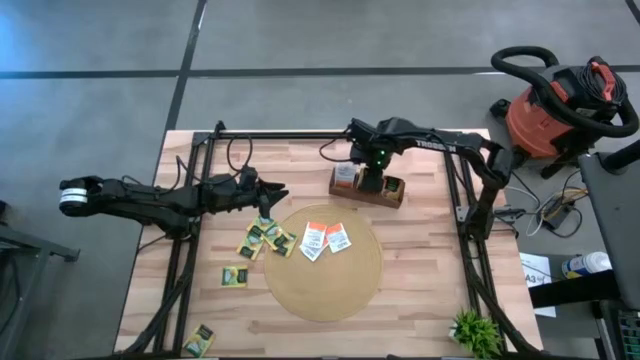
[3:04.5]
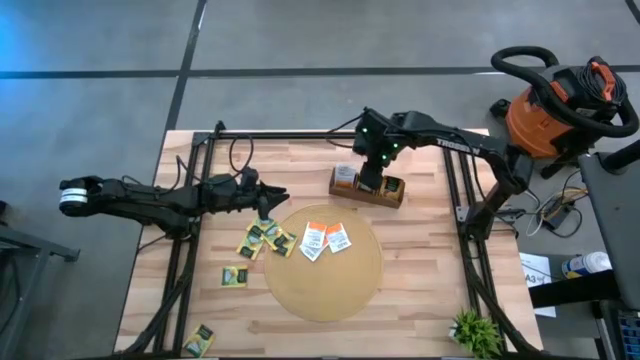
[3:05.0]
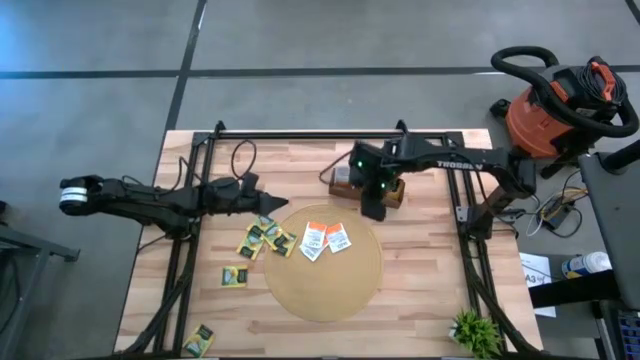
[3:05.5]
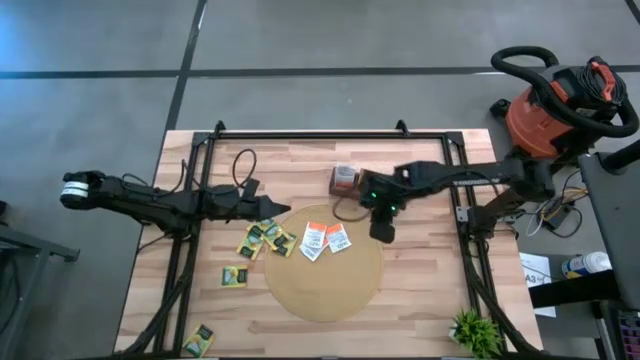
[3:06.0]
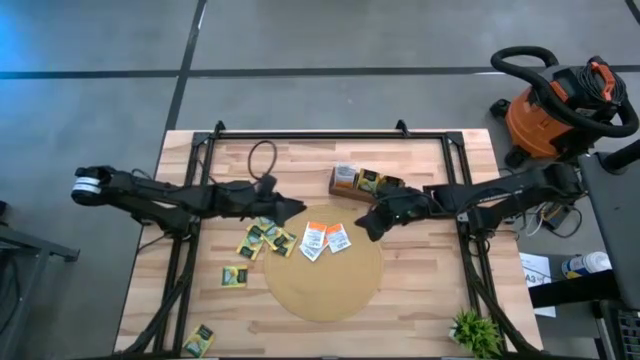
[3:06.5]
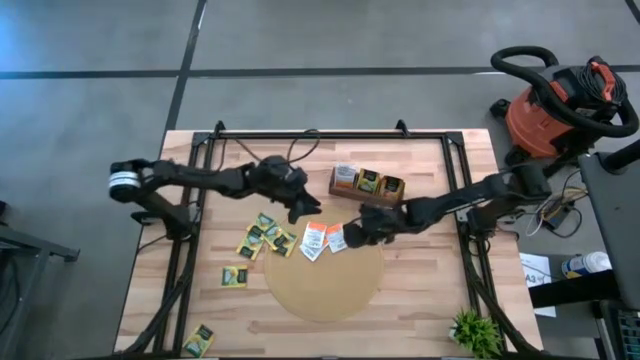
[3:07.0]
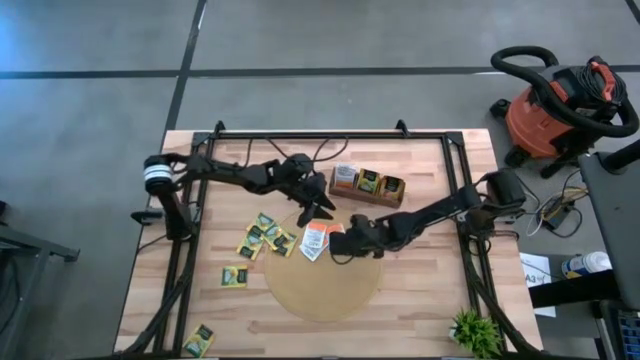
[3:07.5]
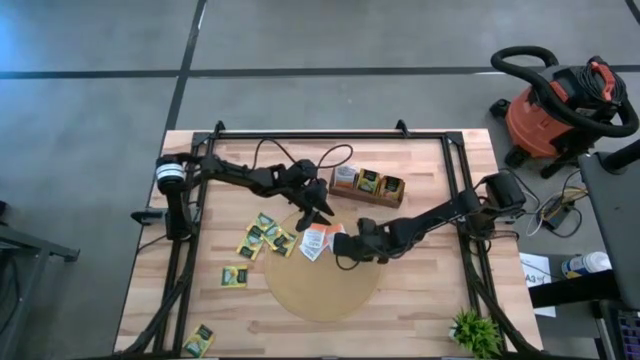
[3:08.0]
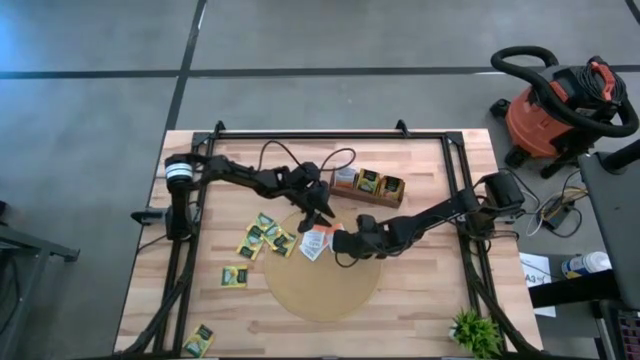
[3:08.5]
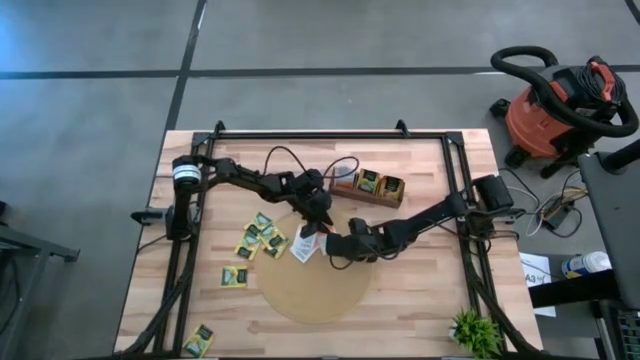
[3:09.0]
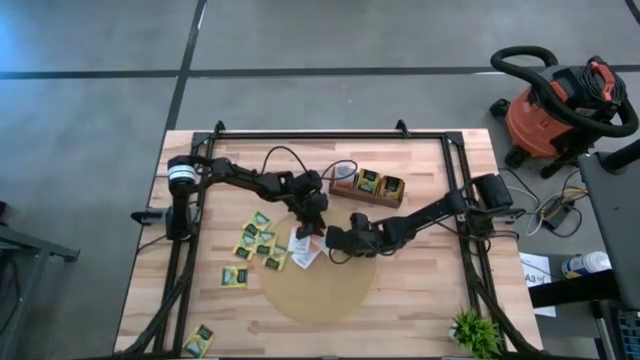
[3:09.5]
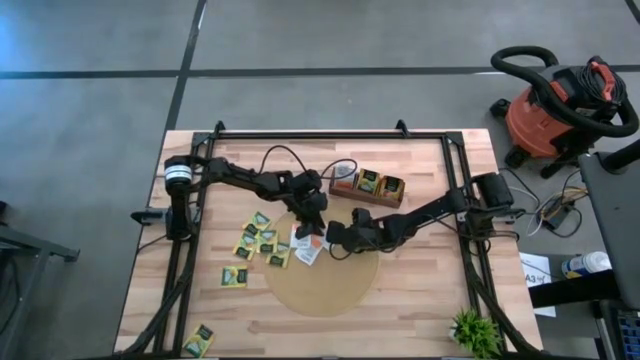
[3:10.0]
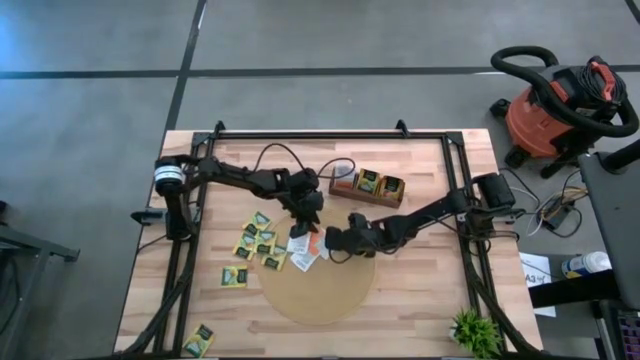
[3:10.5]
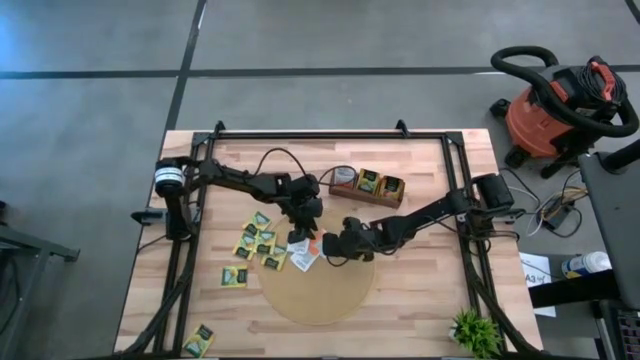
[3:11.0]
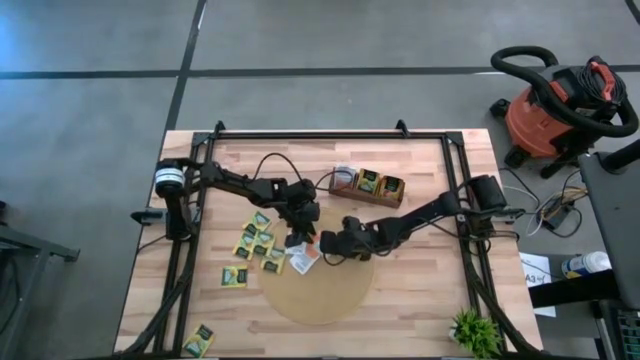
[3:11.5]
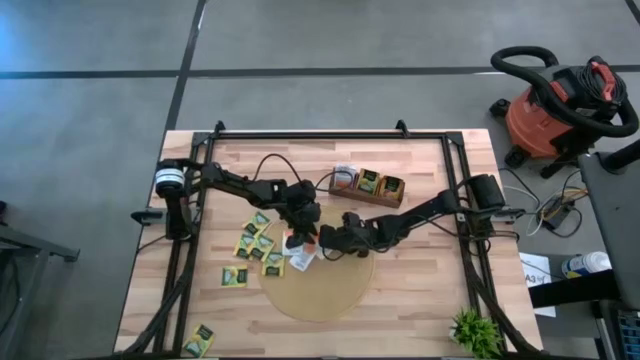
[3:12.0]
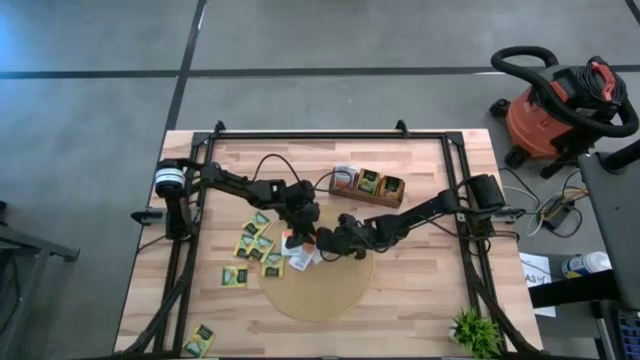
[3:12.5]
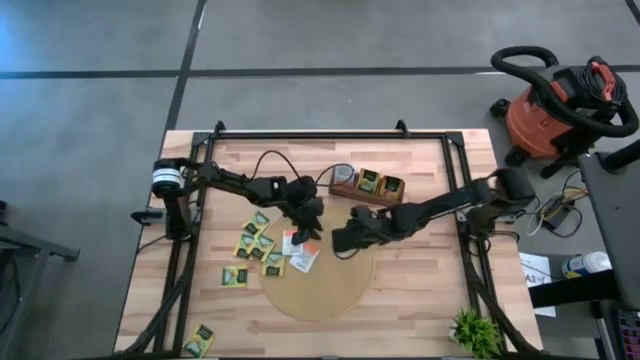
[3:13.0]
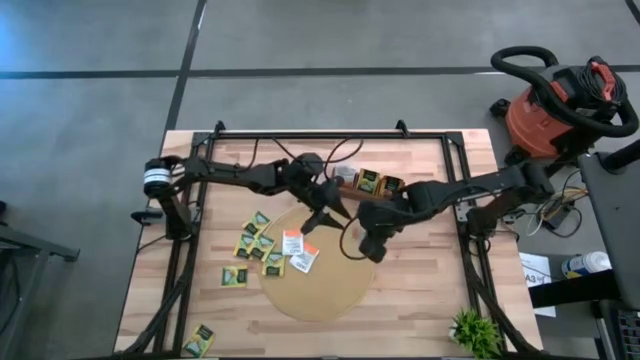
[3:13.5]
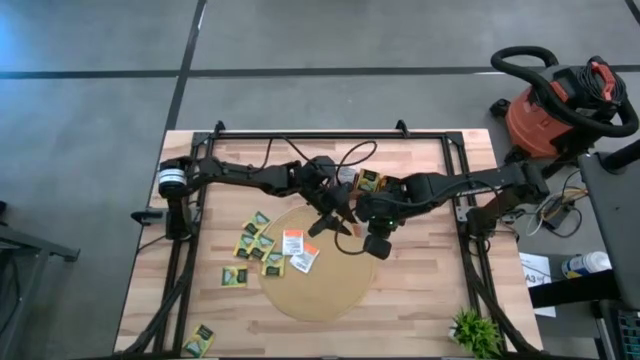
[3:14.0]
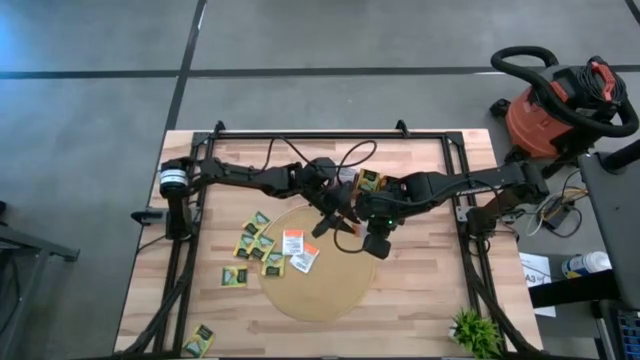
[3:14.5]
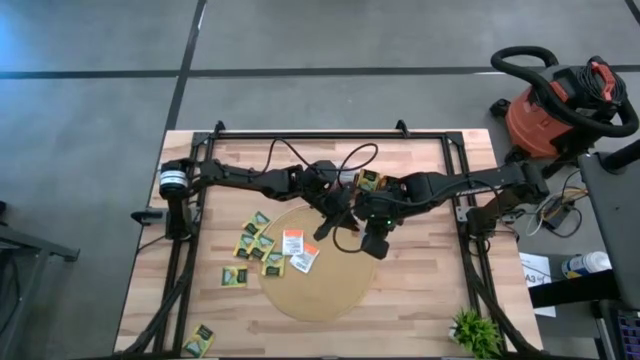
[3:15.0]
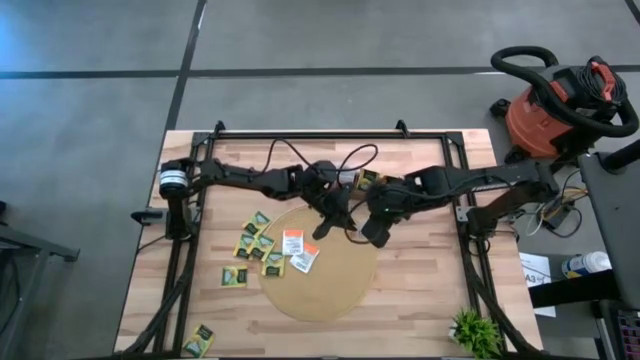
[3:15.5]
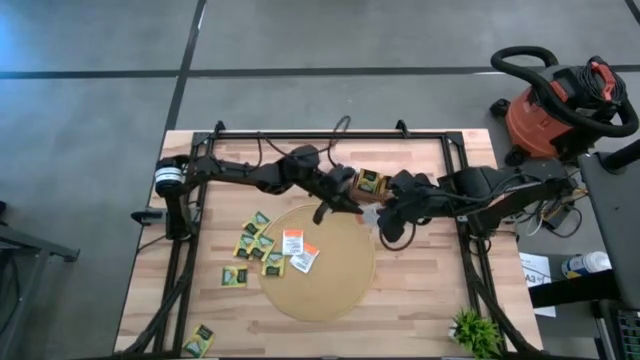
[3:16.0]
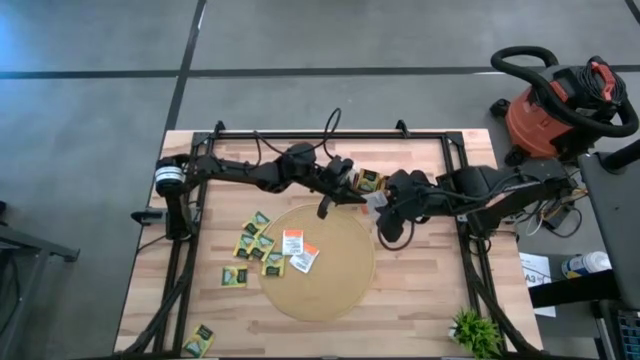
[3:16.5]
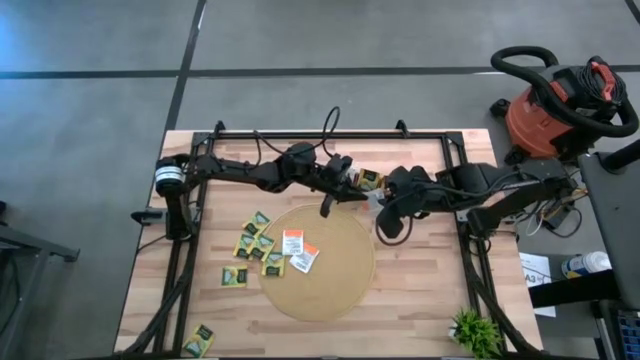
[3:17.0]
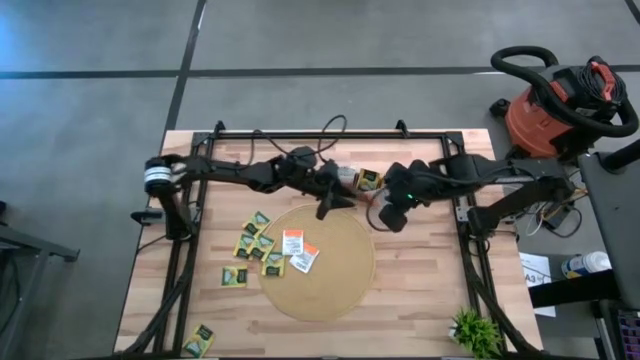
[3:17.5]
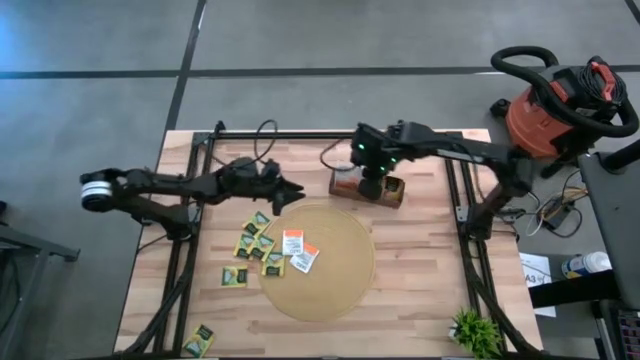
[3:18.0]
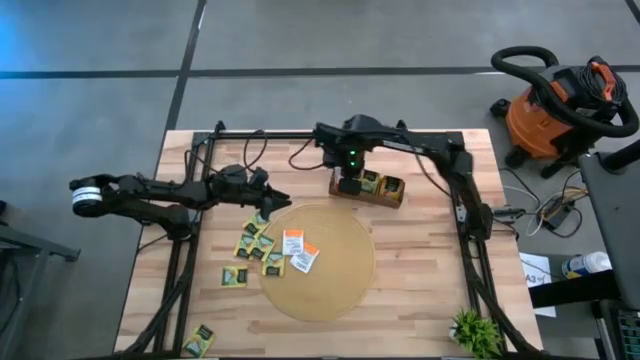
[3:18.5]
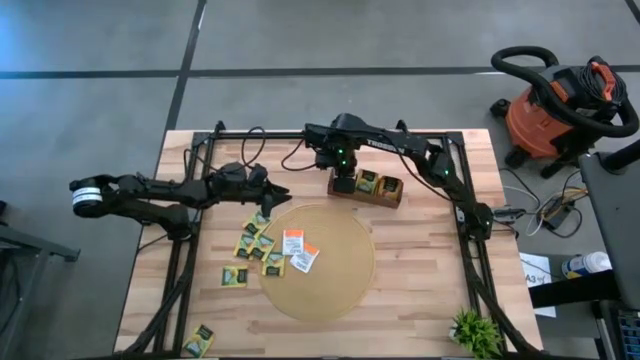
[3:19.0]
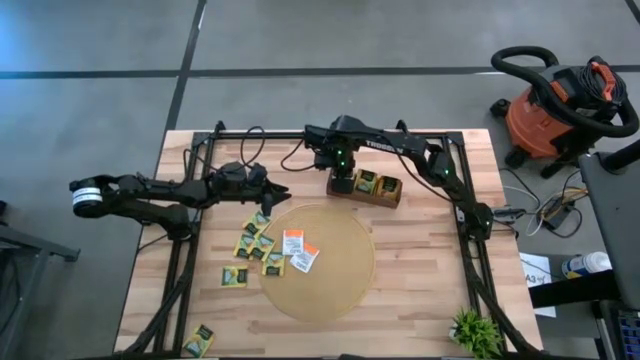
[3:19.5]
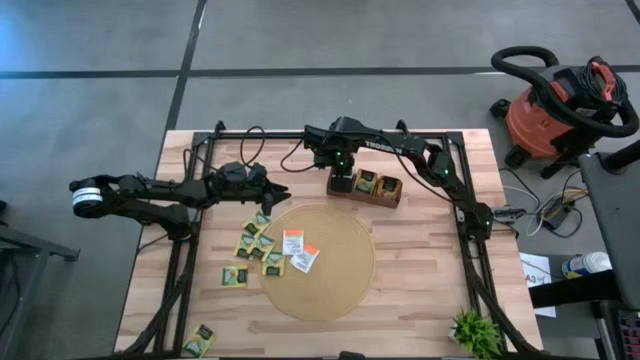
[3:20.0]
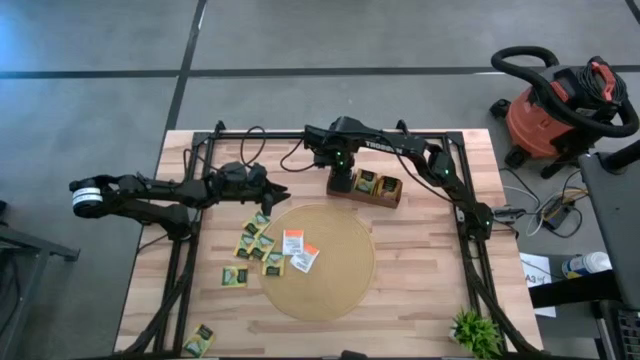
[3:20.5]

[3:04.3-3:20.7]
Task: Pick & Place Tea
Put the orange tea bag into the left section of the wooden organizer
